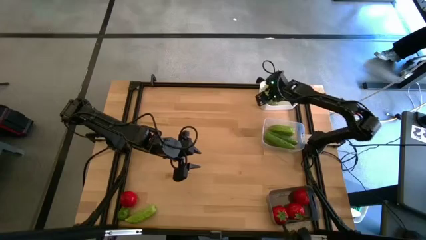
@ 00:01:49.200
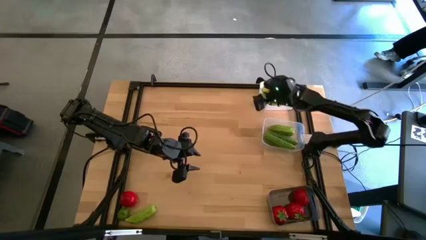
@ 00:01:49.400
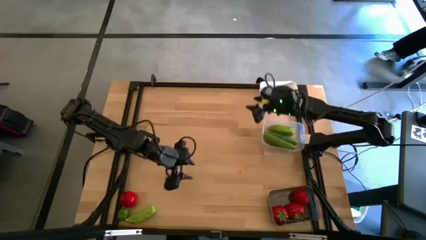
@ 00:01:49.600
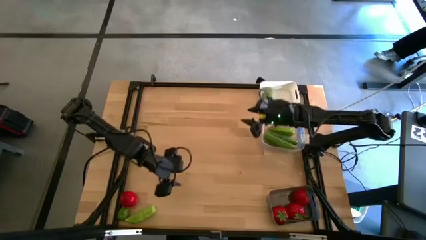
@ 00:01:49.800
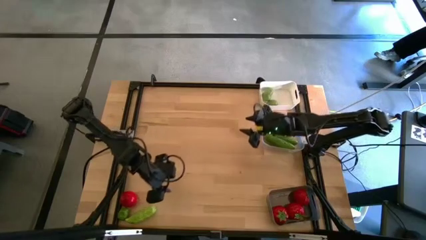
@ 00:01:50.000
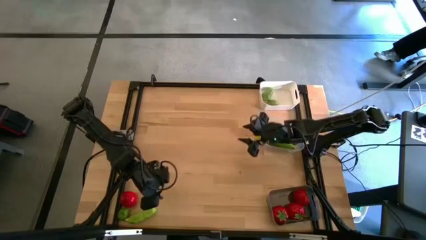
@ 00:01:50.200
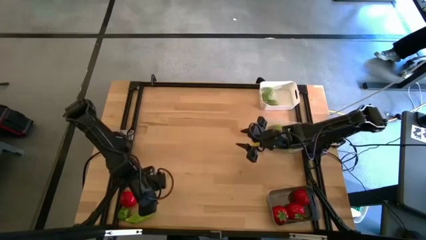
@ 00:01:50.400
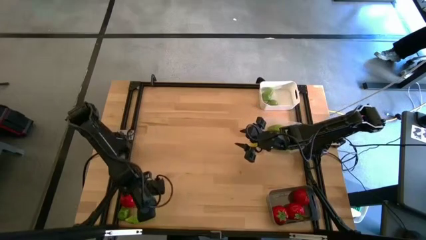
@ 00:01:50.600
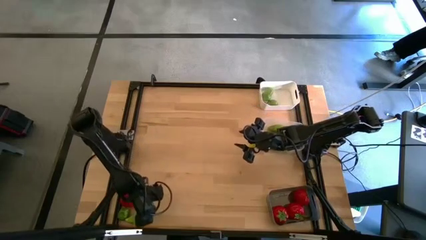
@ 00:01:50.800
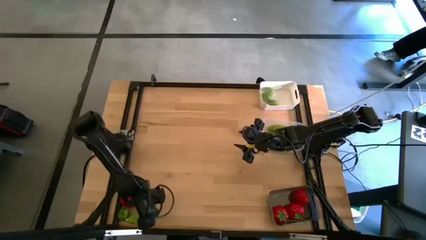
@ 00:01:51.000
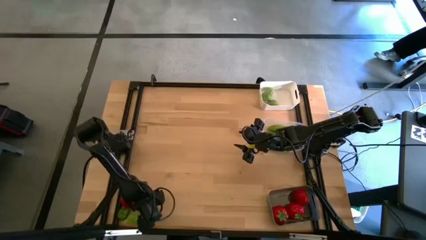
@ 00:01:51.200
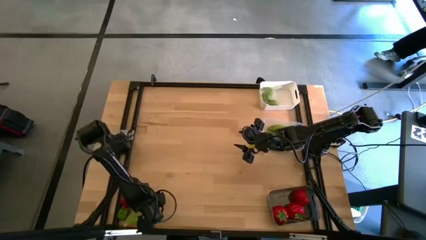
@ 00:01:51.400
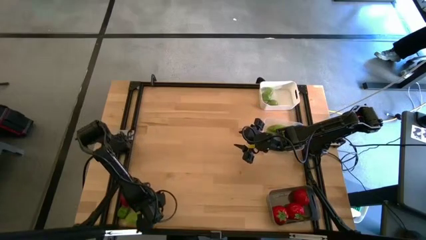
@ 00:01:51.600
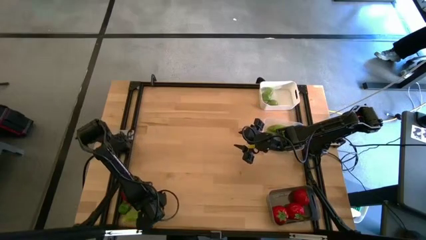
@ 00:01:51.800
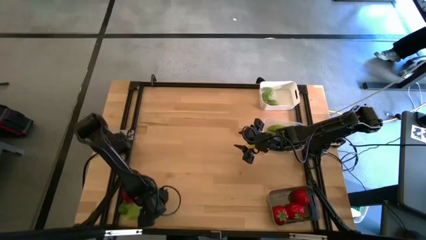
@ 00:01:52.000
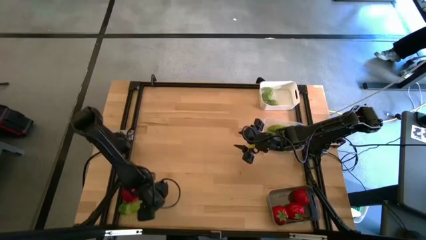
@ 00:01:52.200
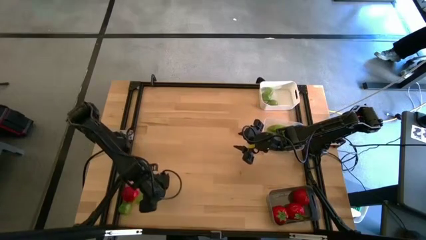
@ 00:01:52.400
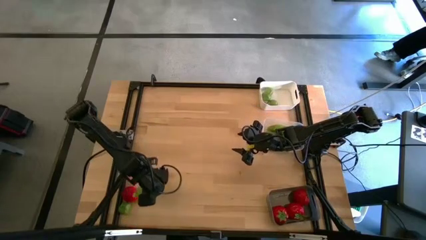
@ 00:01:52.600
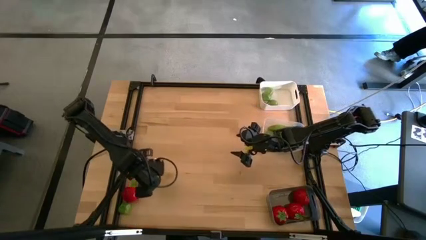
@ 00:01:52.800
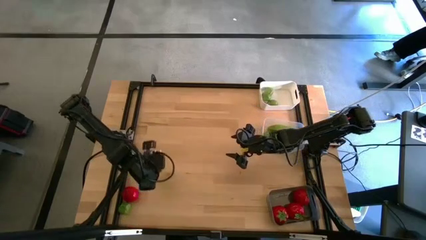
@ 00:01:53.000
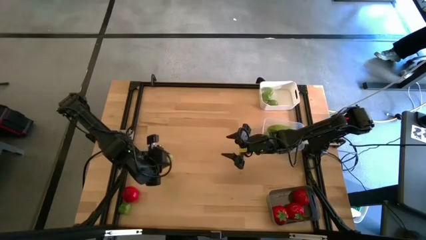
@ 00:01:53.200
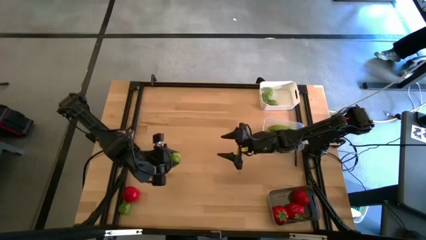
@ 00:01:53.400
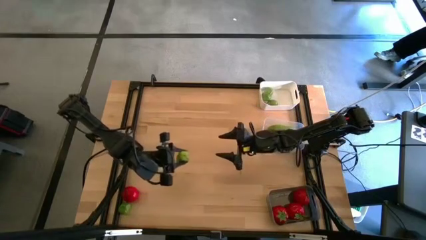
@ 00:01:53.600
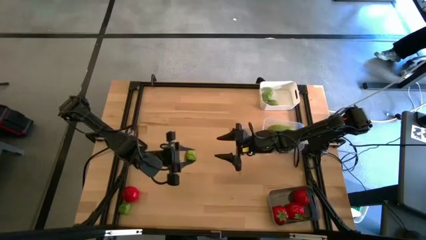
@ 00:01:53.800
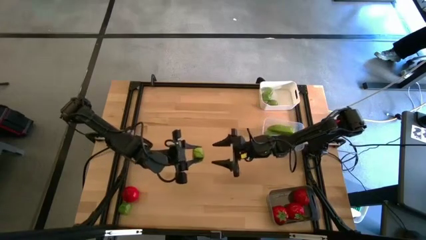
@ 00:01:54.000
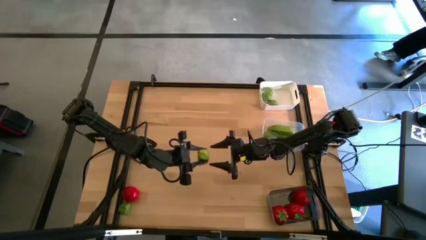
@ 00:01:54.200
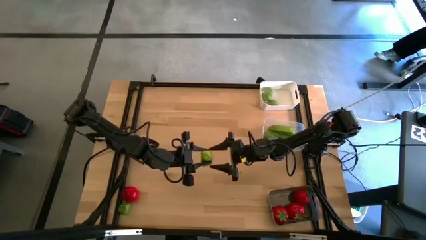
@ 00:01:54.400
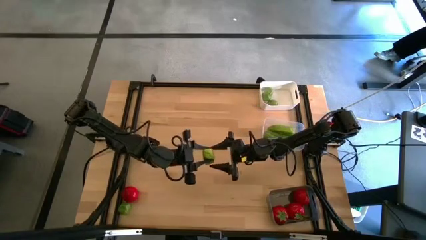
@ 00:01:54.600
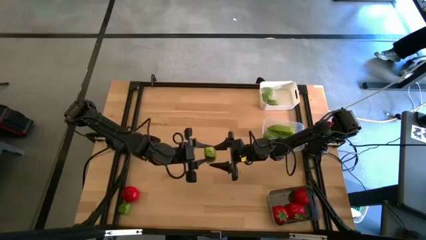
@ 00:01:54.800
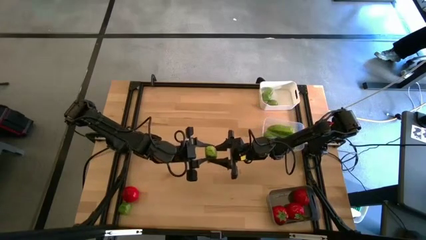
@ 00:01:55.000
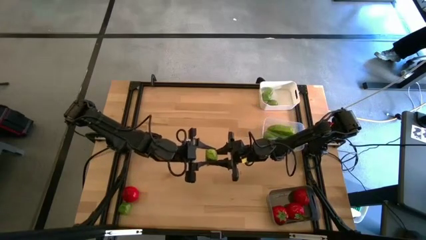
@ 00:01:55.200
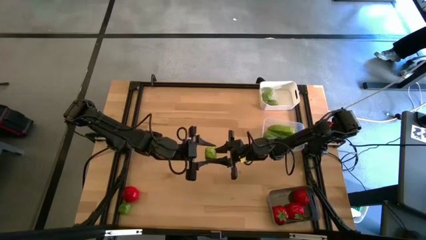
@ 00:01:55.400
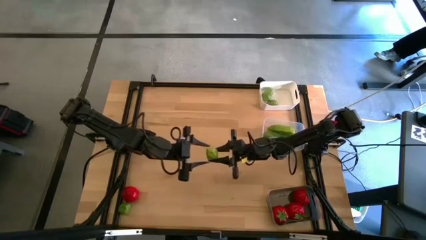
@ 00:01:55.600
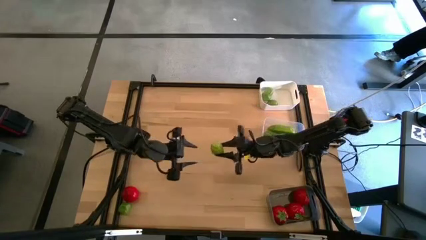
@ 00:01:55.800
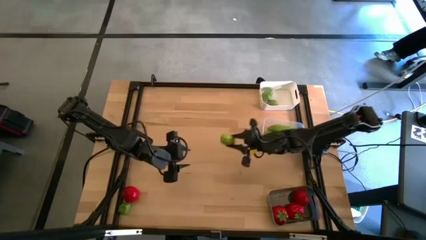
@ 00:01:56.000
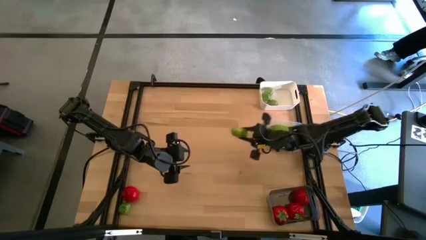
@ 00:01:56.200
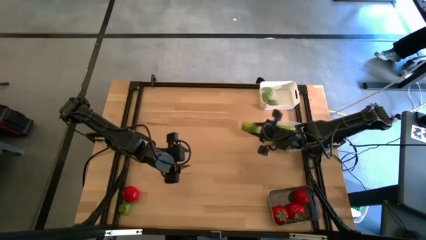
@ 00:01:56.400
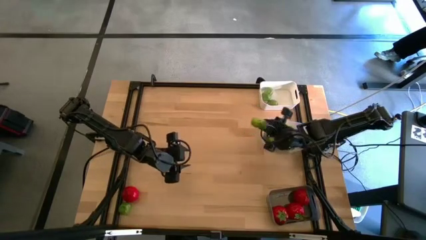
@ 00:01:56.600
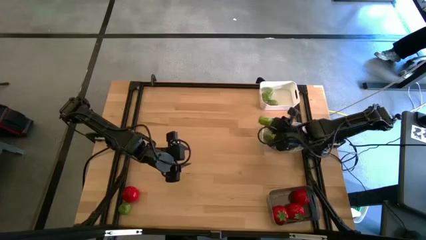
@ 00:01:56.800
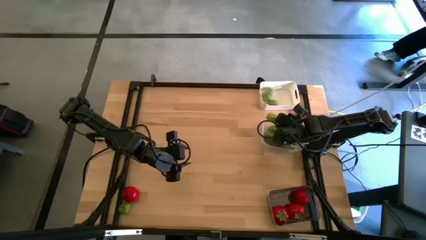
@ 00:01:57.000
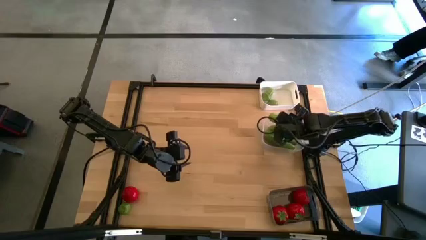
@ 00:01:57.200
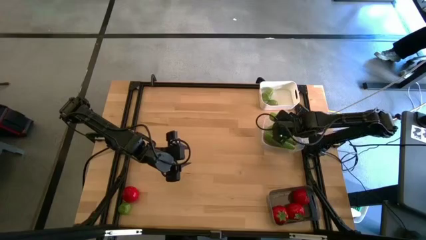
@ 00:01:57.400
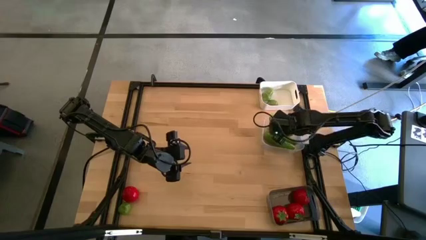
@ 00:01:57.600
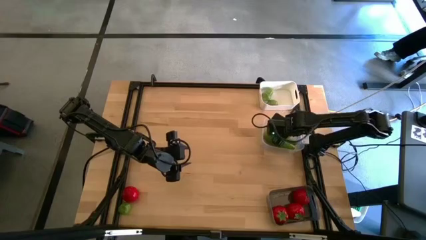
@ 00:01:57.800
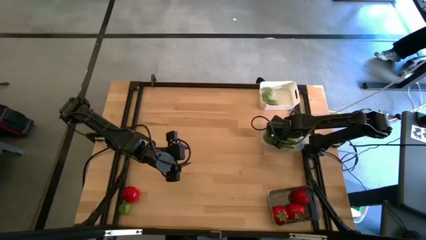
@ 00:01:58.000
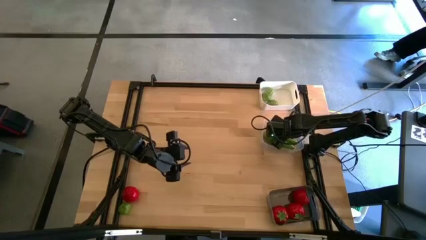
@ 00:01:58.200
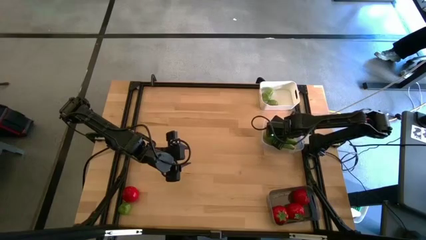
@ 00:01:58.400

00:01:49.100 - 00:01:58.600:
Task: Sort produce into baskets
Put the cucumber into the transparent bin
